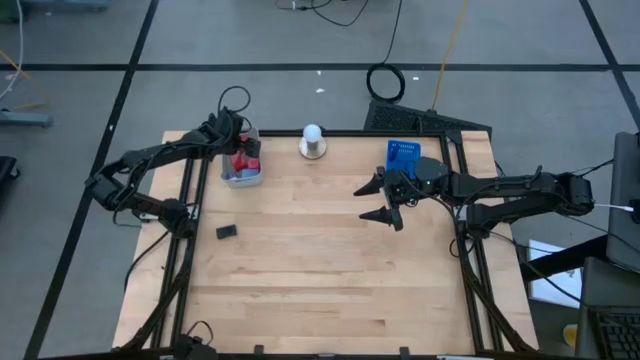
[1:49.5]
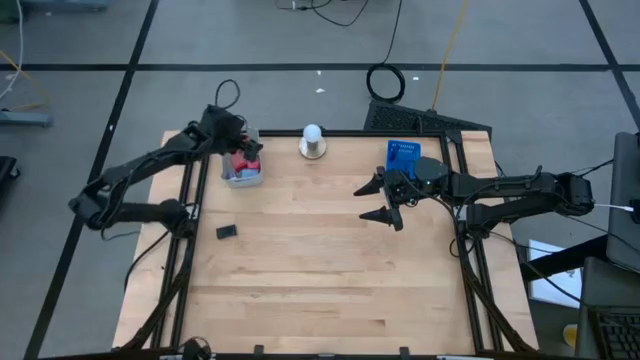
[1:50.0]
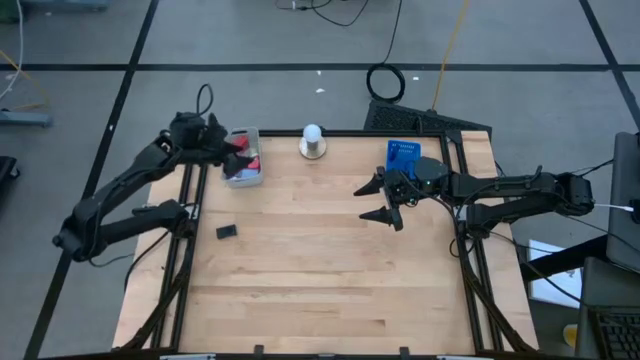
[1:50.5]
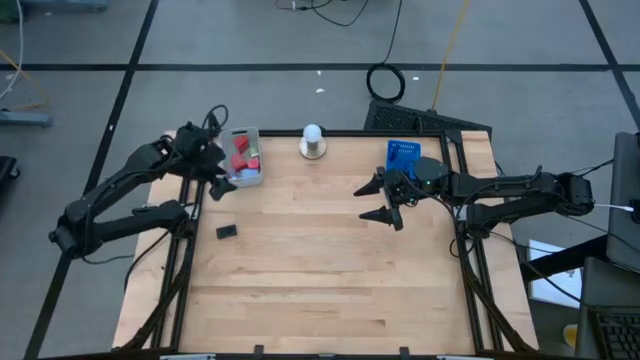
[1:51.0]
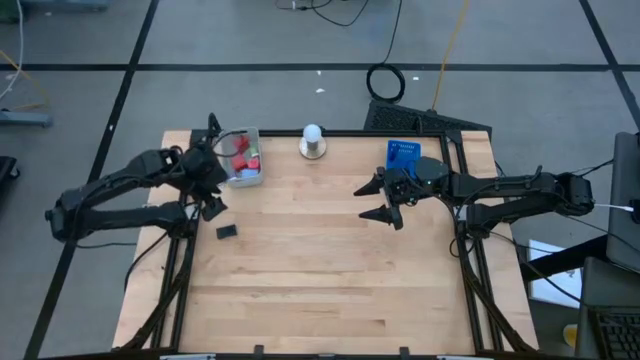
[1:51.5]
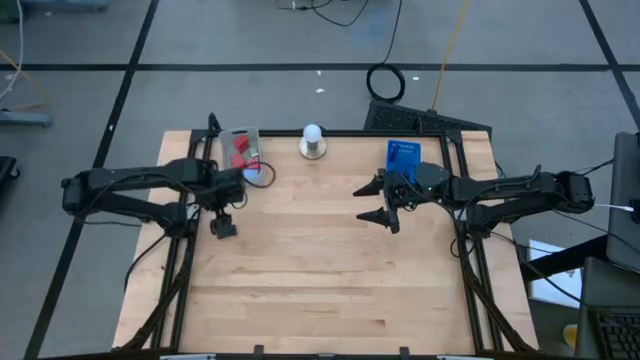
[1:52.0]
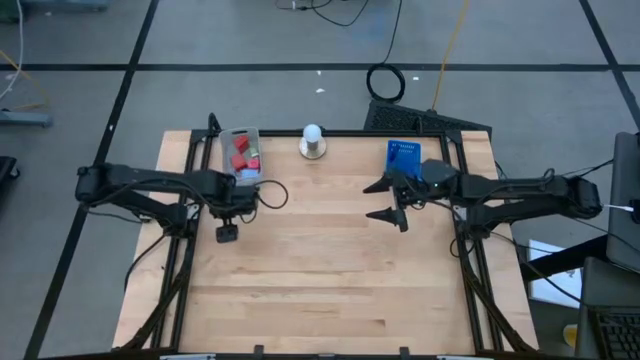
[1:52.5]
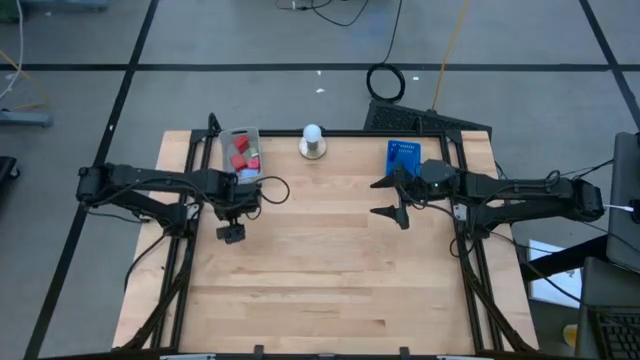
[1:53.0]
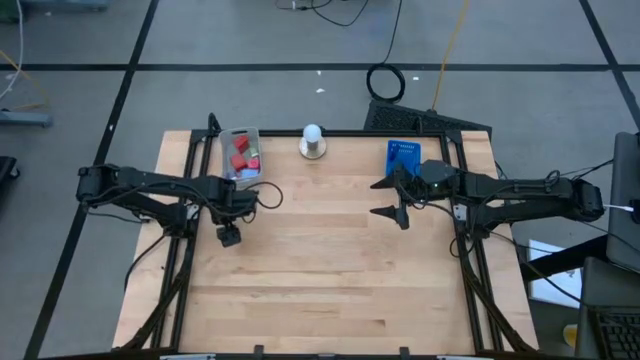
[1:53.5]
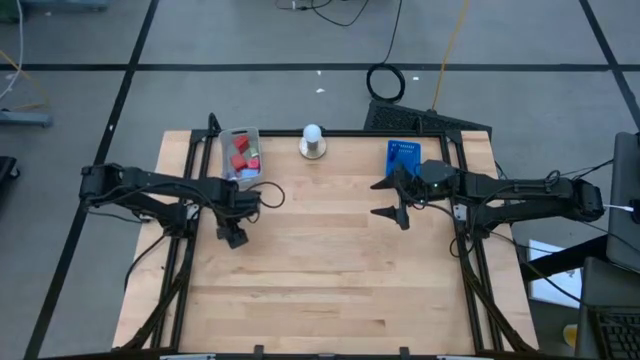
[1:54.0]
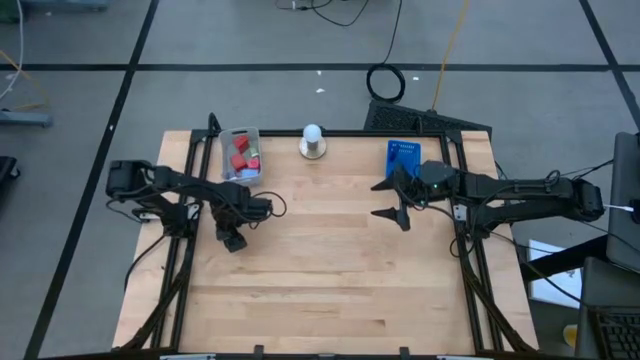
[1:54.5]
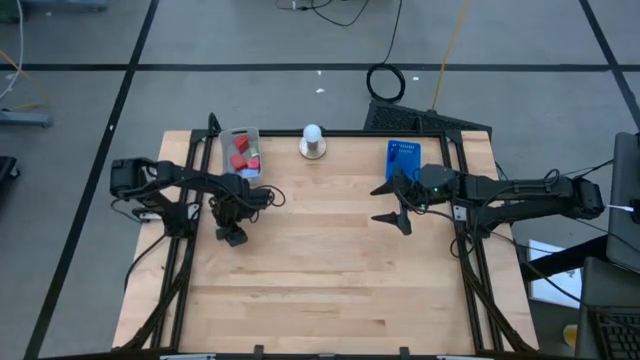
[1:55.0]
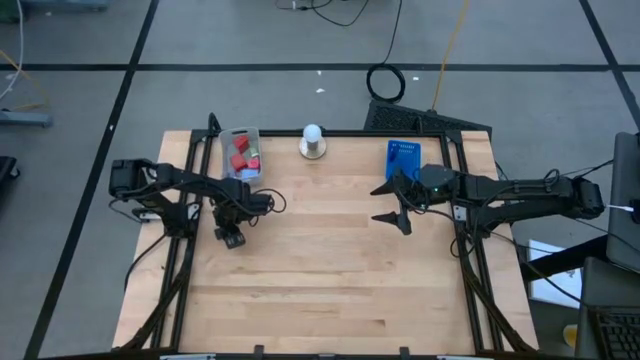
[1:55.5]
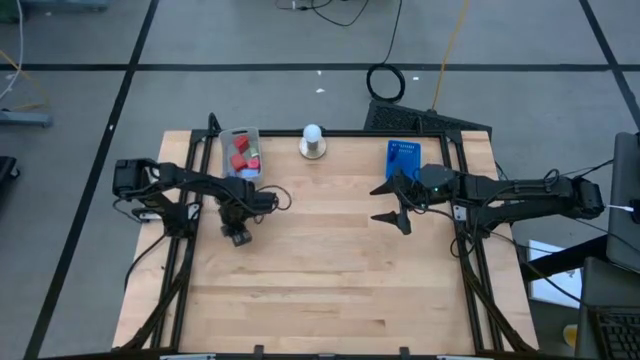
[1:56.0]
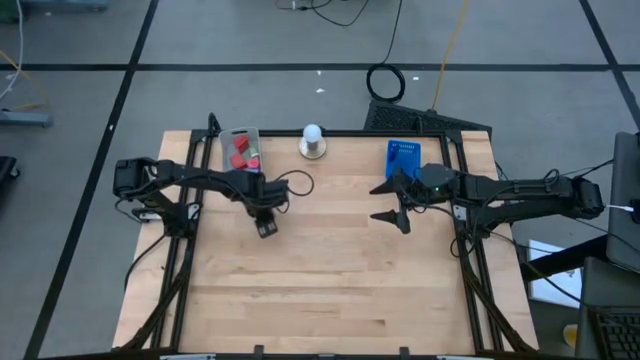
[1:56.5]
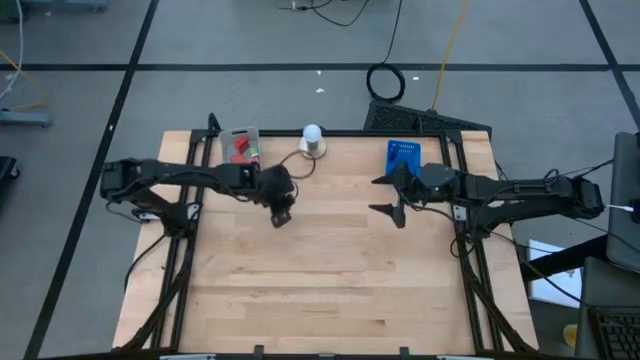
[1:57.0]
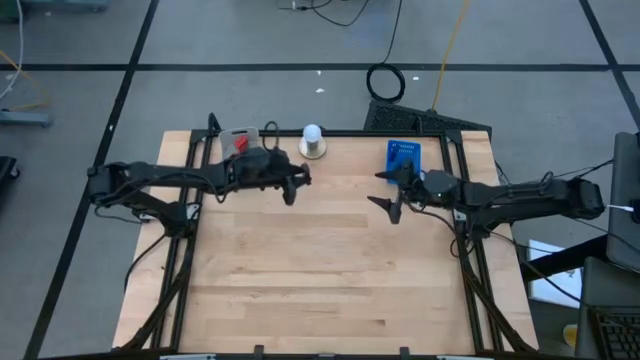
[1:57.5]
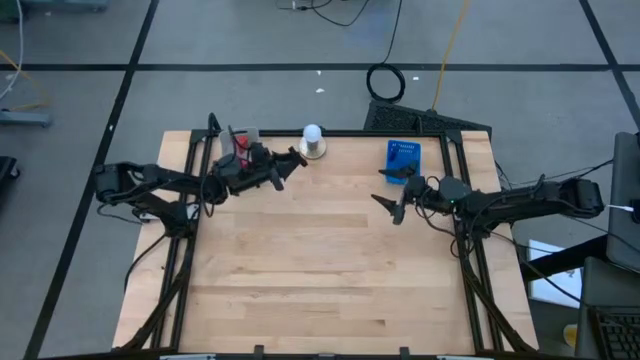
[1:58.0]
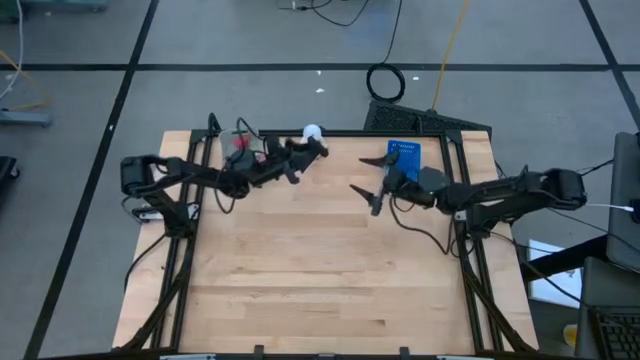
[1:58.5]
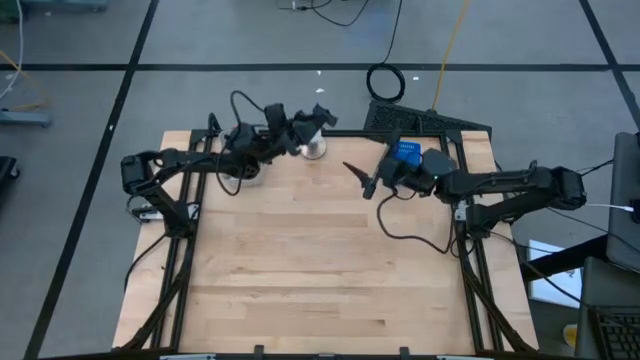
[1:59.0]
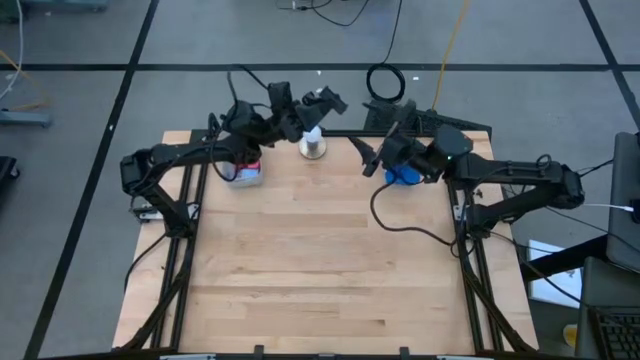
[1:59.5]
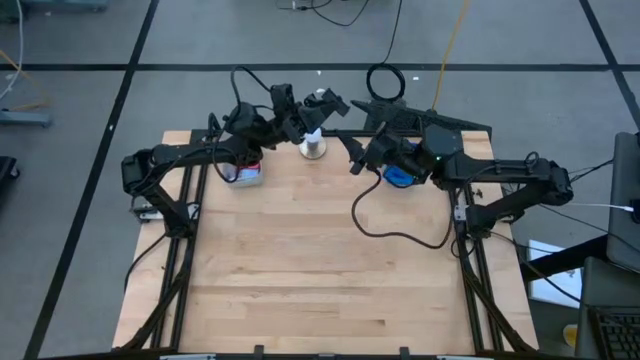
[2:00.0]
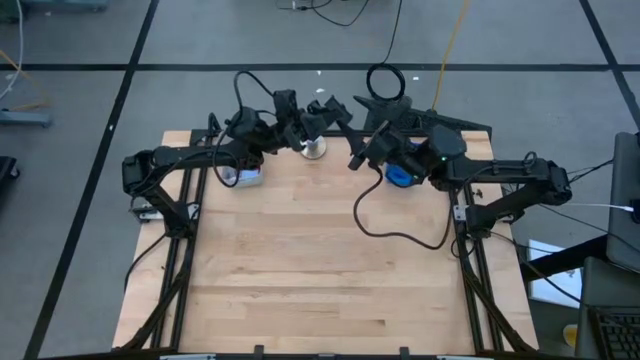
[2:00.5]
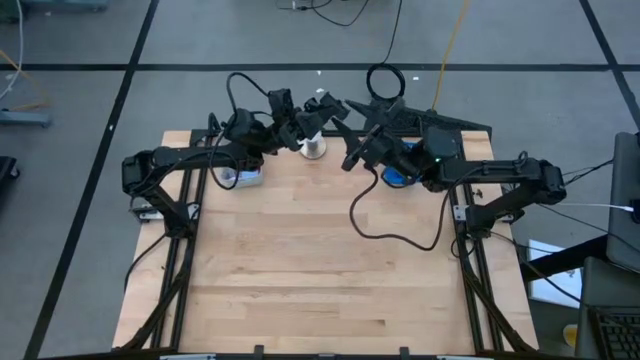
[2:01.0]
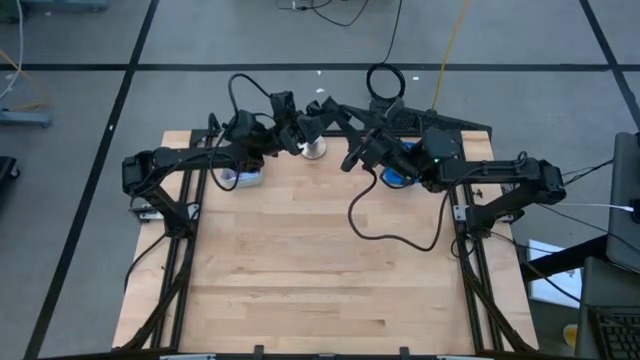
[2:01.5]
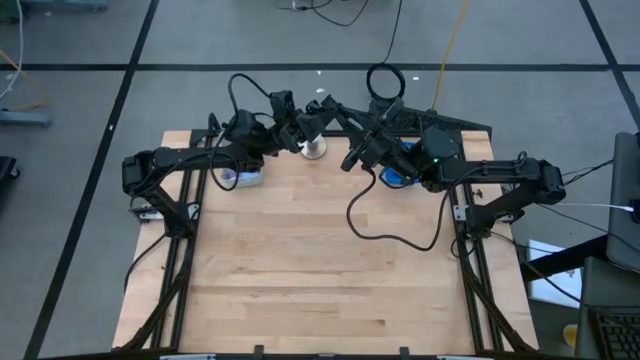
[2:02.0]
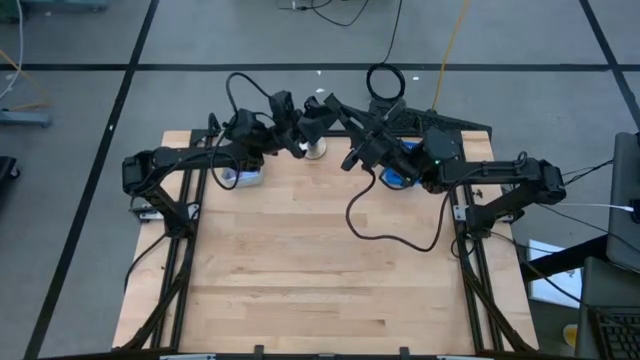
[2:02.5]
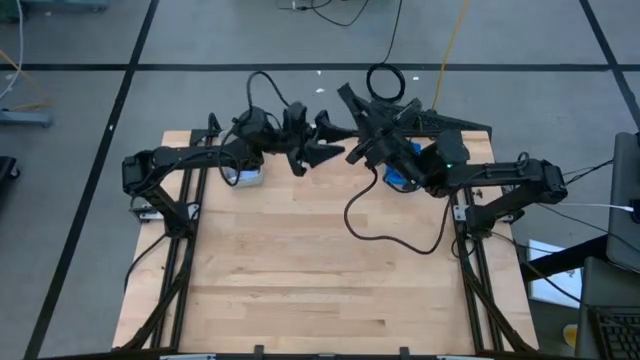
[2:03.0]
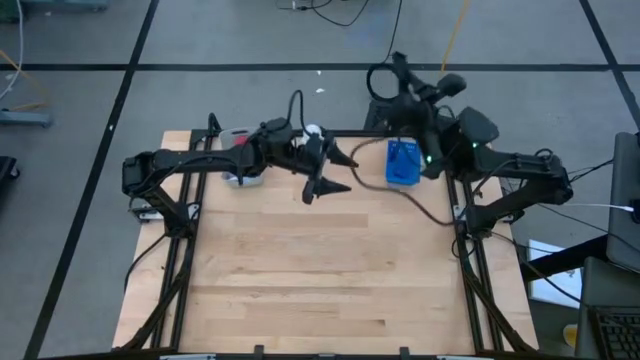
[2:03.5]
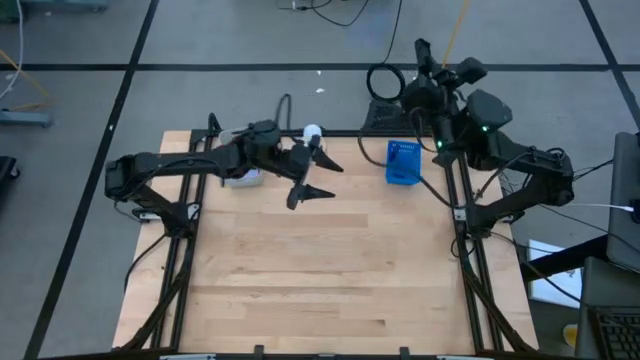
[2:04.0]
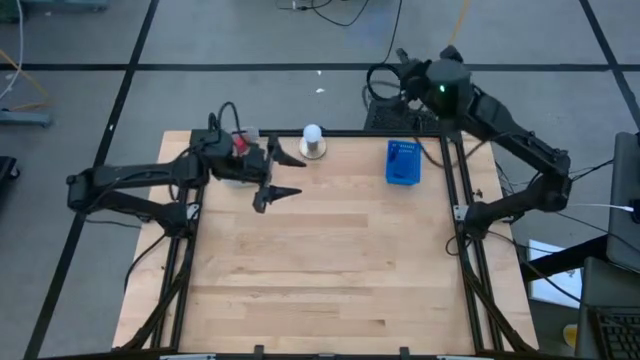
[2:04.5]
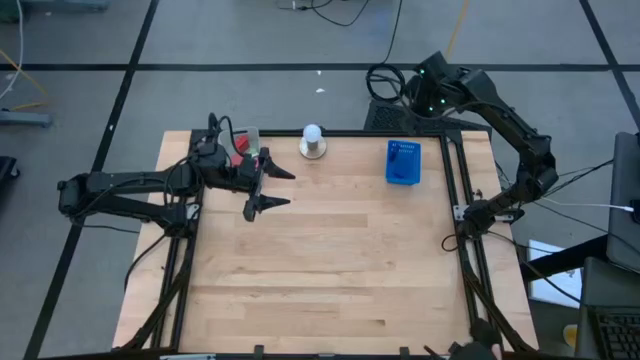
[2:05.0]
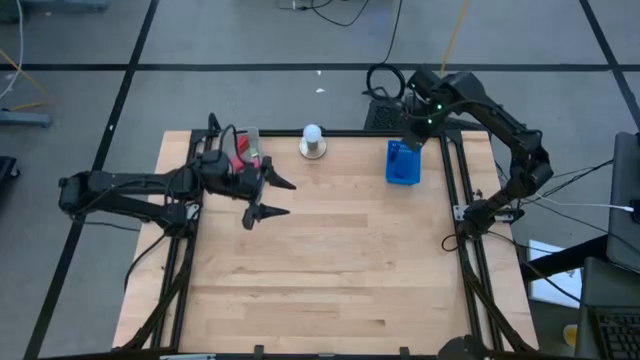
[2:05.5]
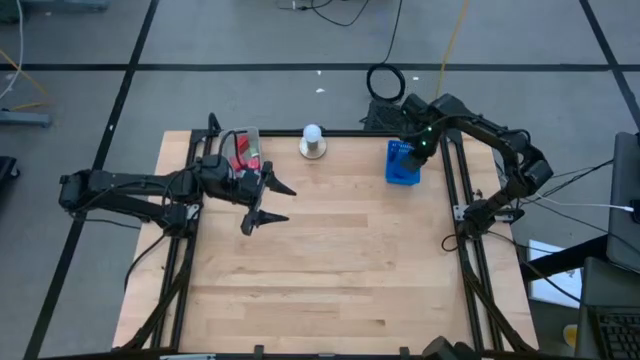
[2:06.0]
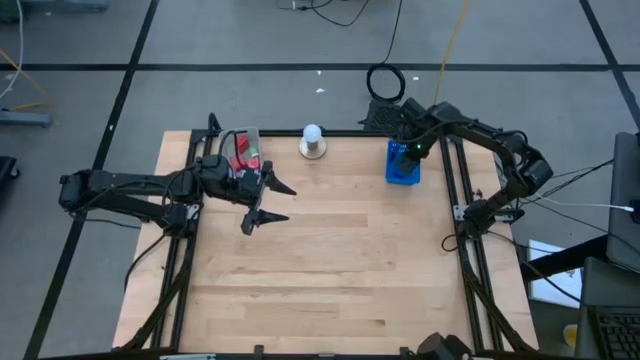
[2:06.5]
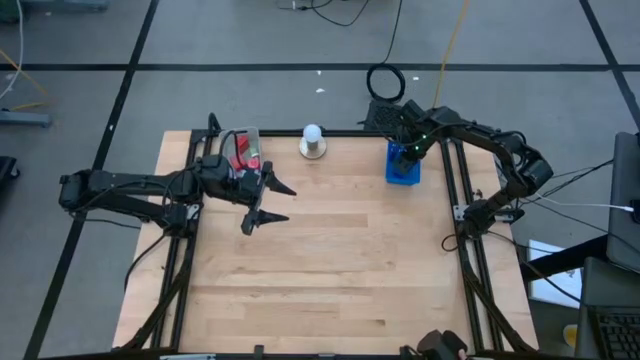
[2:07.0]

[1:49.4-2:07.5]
Task: Pick & Place Office items
Put the black digital clock into the blue bin

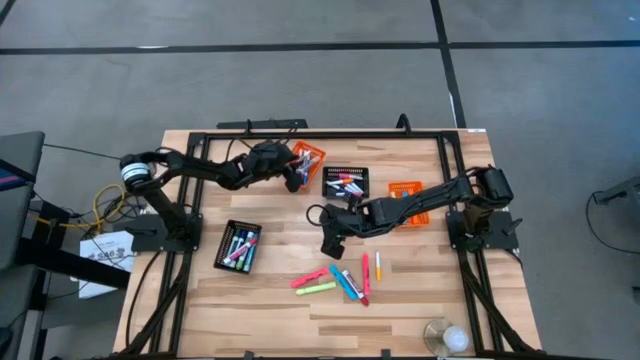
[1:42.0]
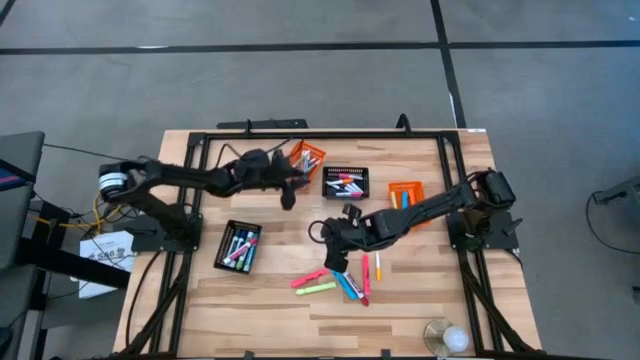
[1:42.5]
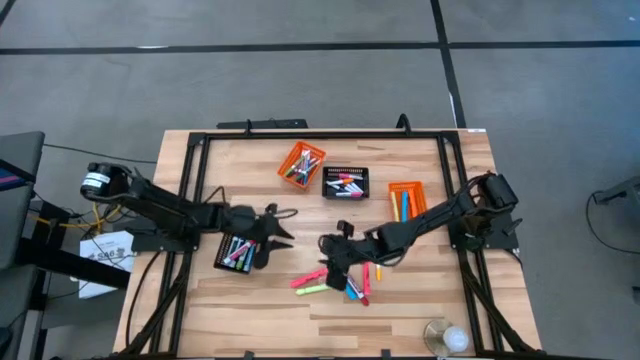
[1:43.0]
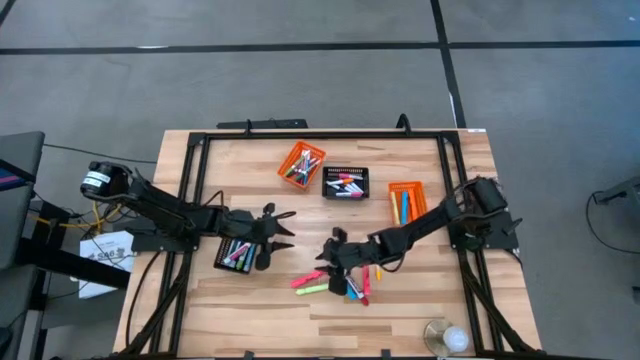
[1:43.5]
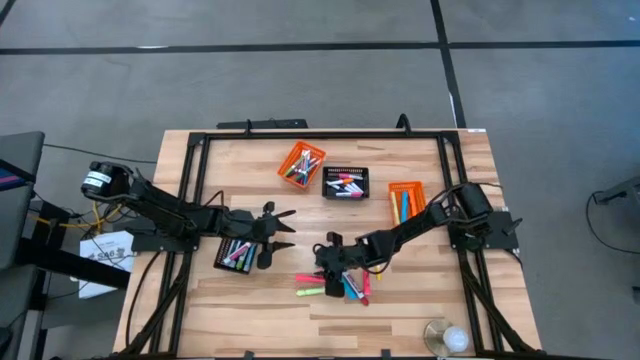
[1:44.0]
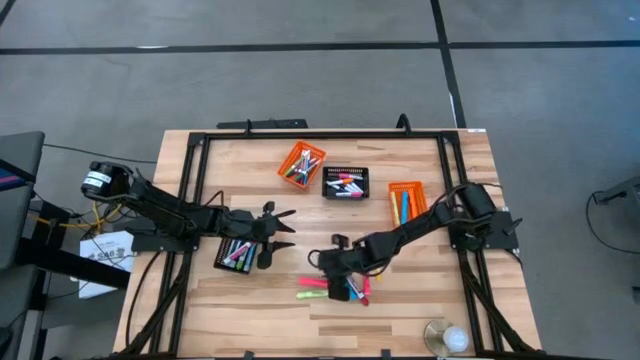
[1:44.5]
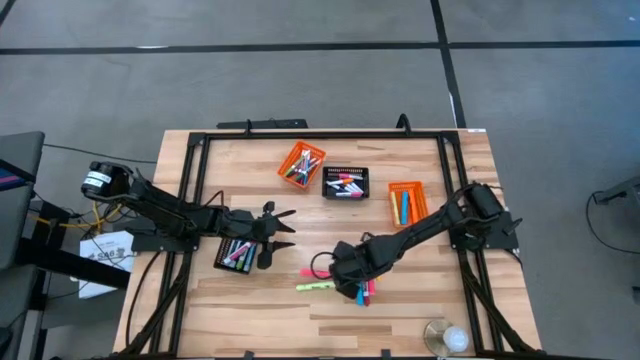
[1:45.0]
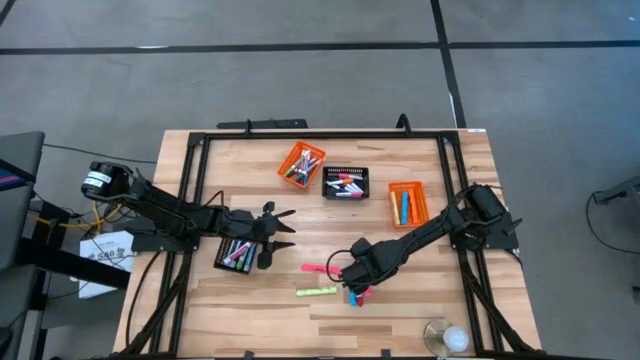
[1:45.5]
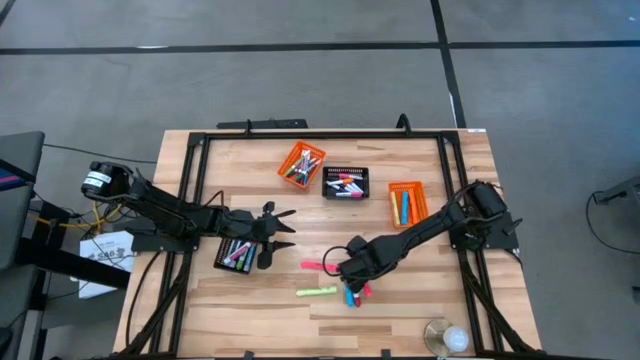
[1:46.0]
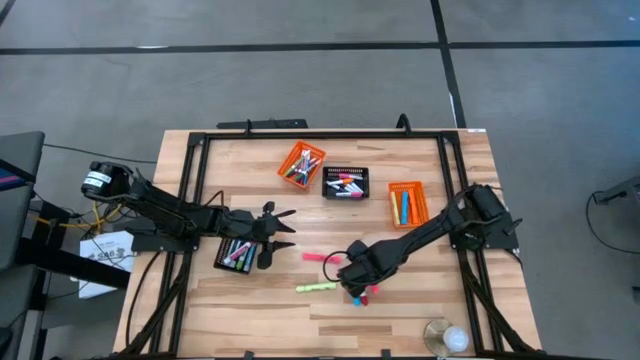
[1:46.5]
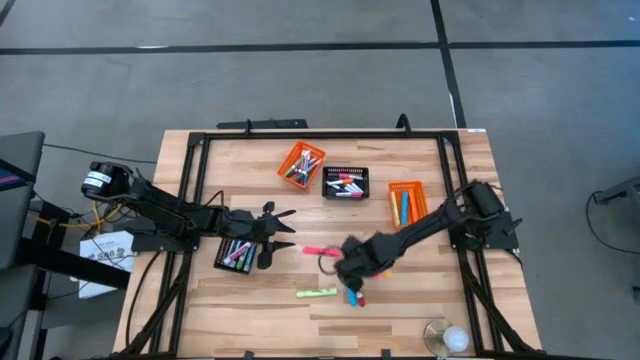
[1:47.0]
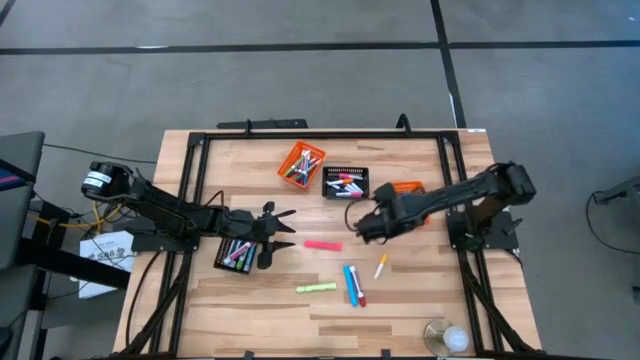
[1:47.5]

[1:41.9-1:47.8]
Task: Pick & Place Markers
Put the pink highlighter into the right orange bin
